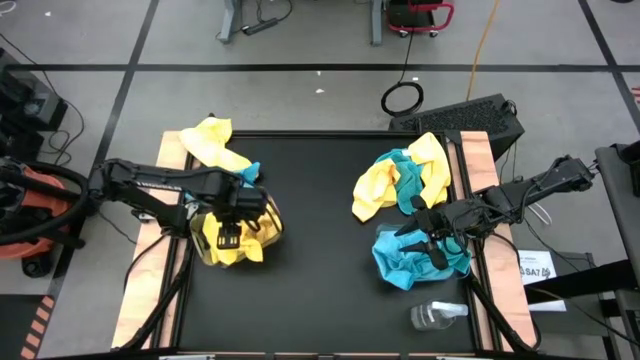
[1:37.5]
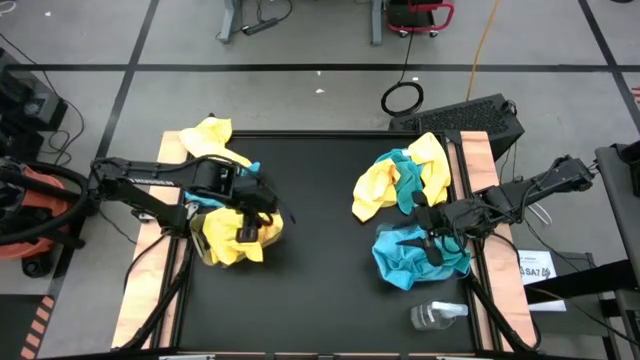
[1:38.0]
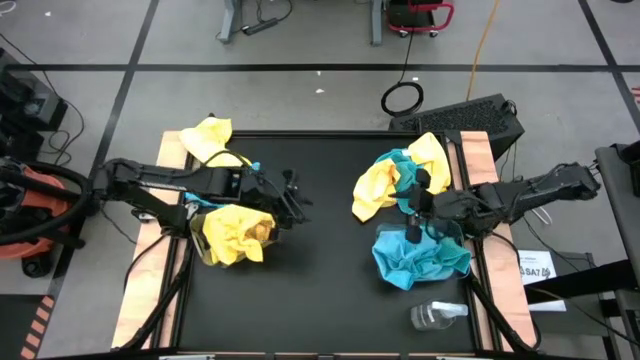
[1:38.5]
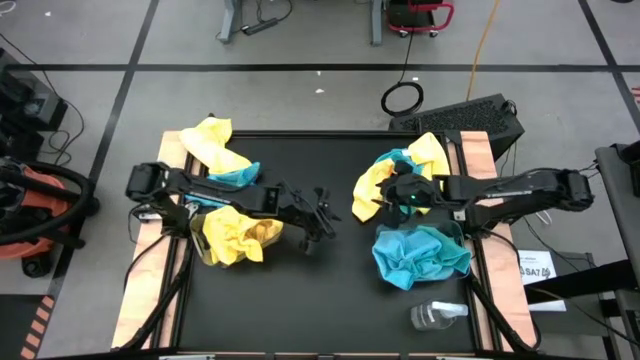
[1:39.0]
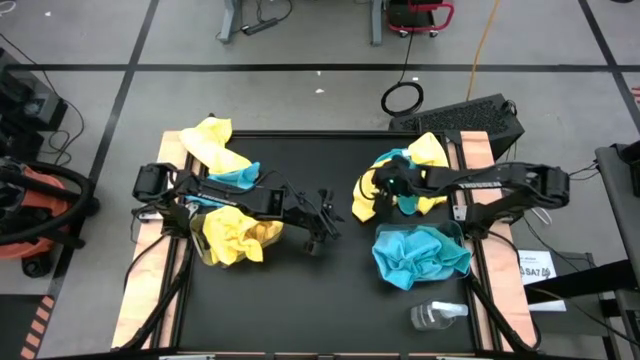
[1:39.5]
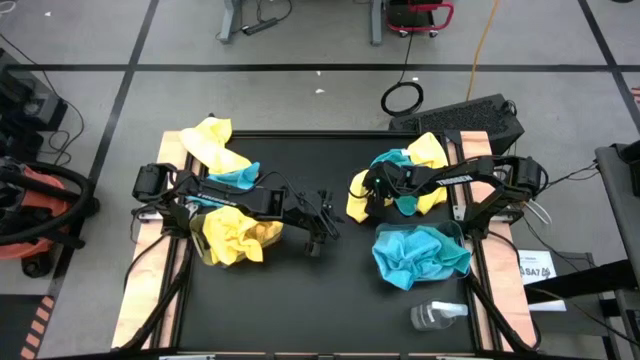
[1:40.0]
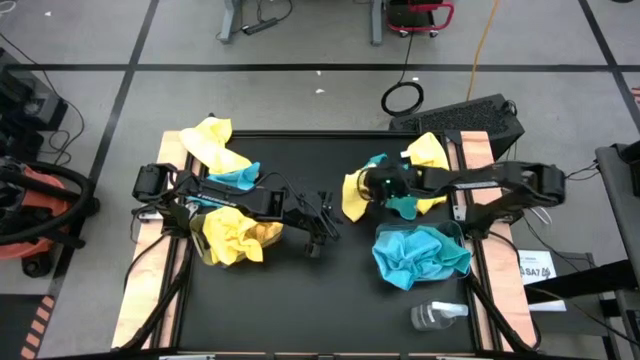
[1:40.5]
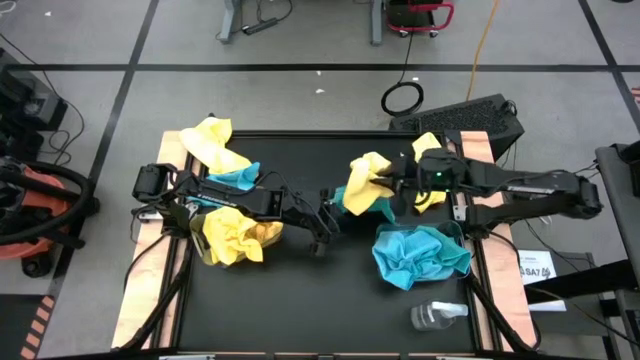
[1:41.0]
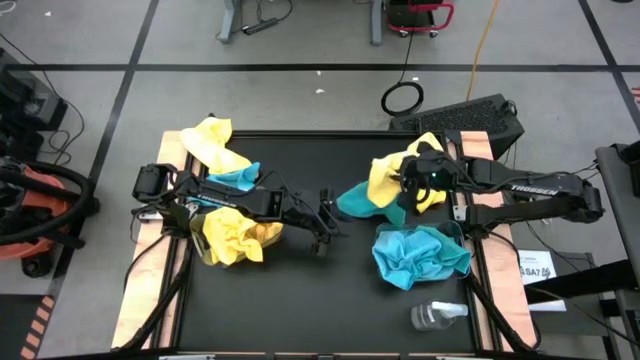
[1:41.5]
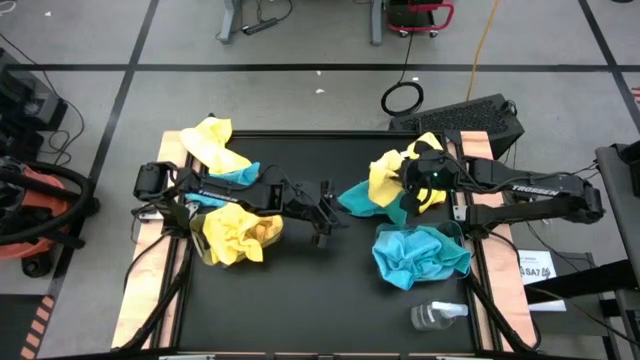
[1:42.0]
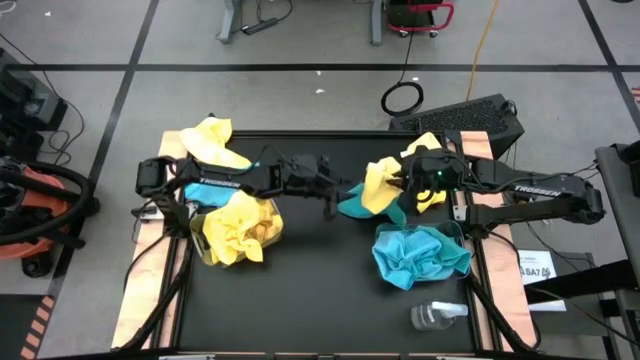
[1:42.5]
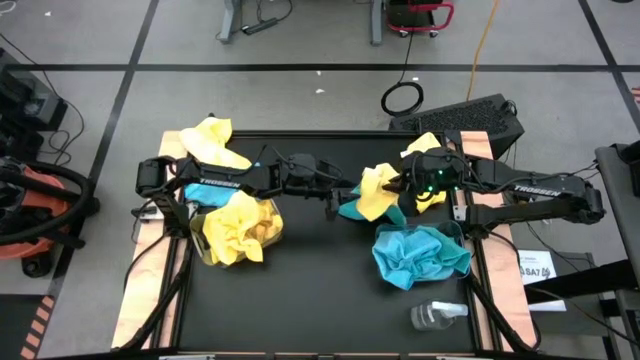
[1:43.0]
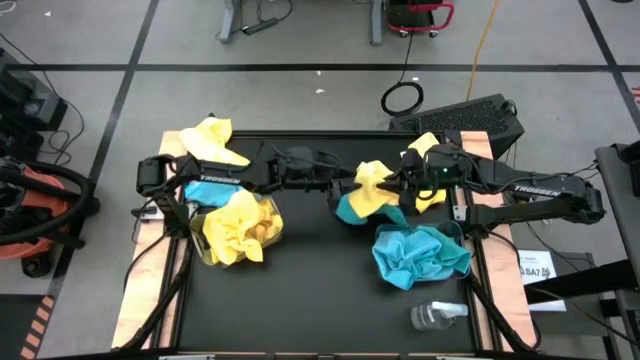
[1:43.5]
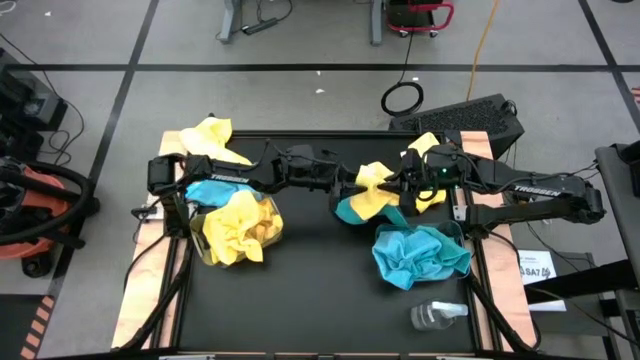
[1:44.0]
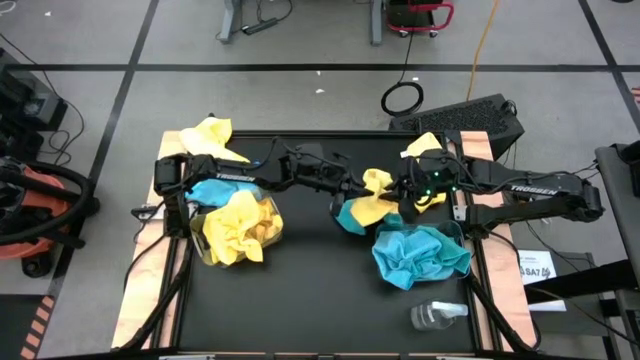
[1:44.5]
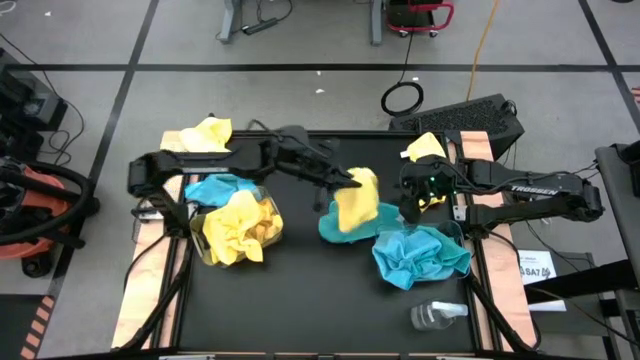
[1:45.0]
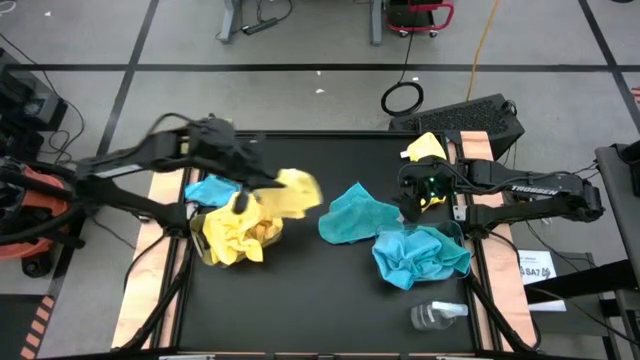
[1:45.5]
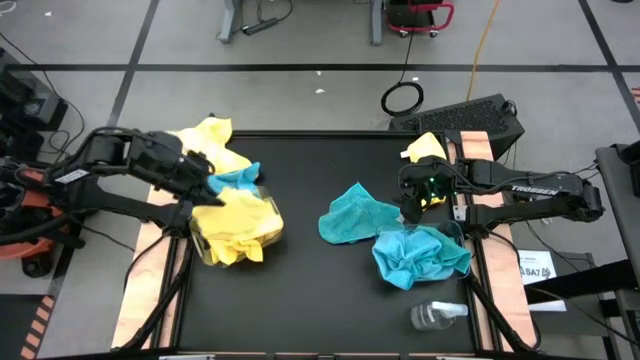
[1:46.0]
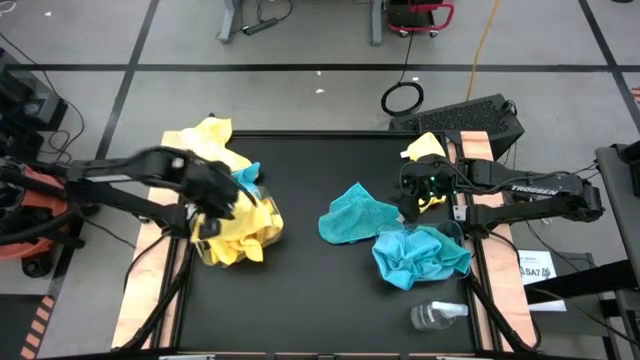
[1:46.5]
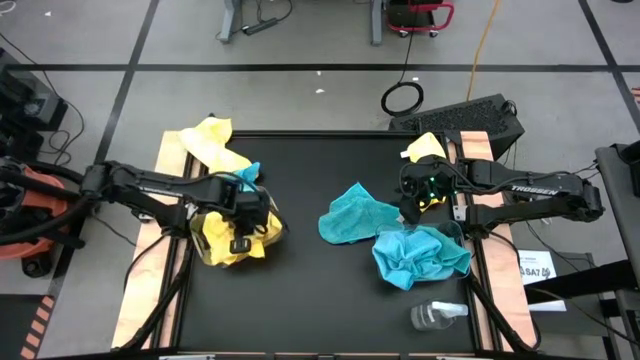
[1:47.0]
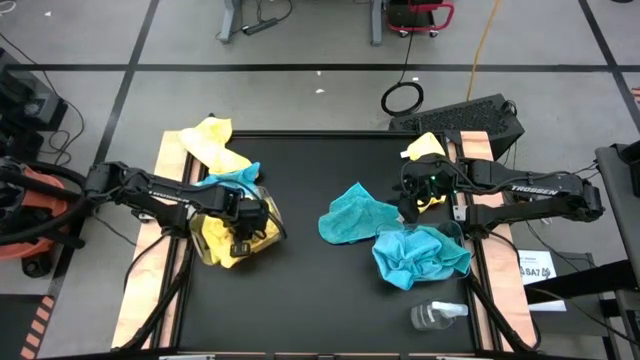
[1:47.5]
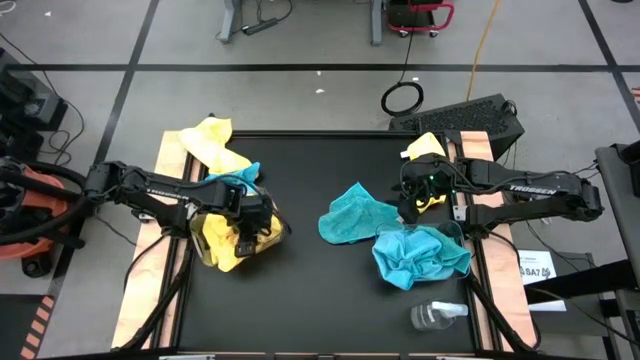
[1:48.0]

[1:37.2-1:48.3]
Task: Sort microfiber towel by color & place in baskets
Put the yellow microfiber towel into the left transparent bin

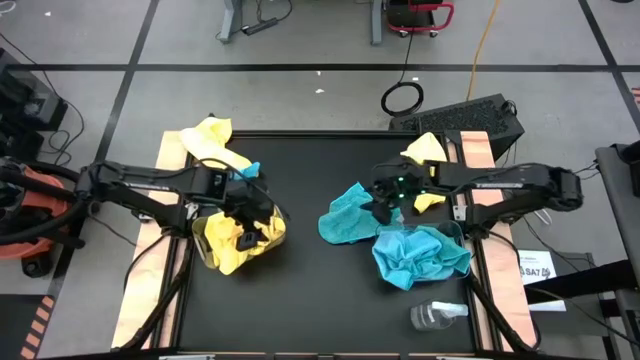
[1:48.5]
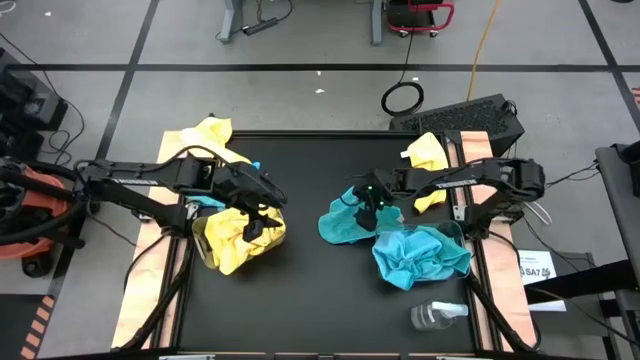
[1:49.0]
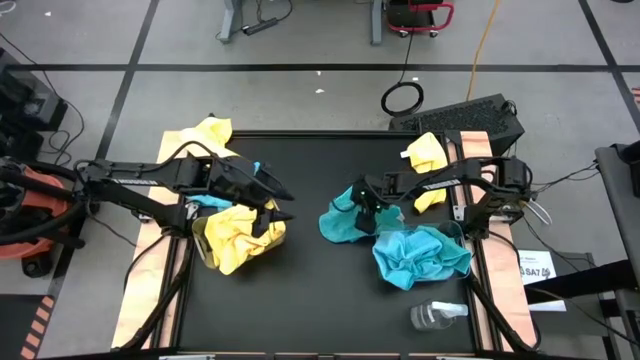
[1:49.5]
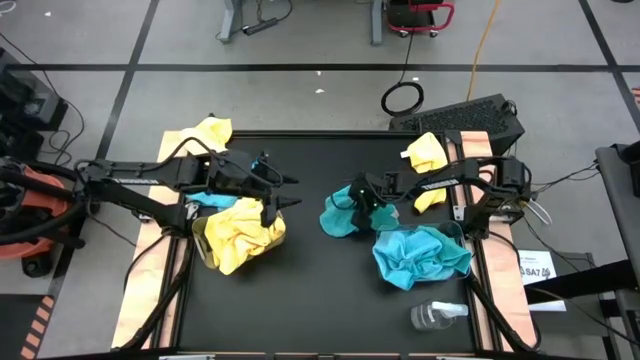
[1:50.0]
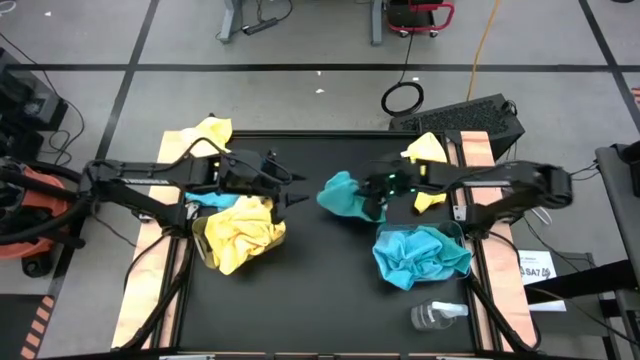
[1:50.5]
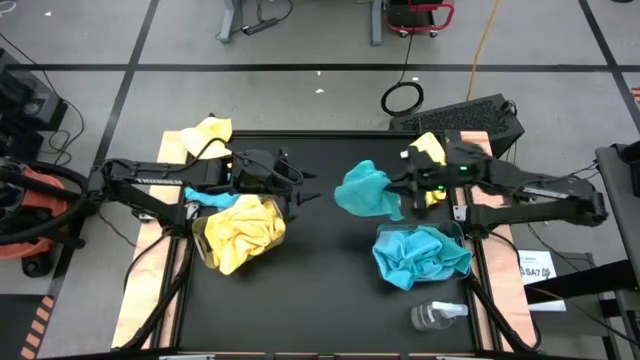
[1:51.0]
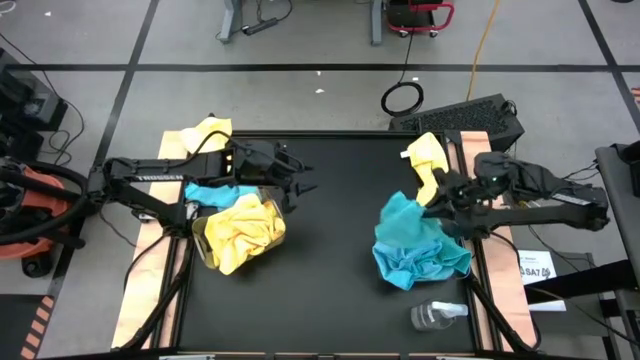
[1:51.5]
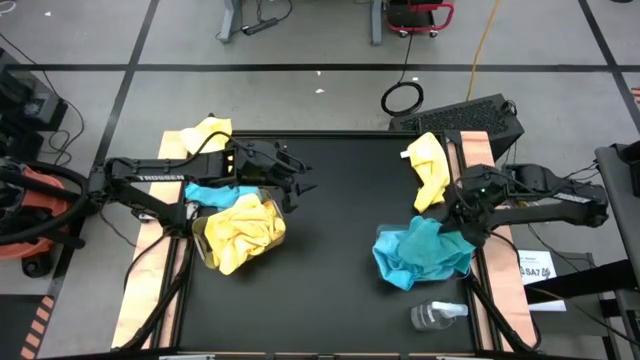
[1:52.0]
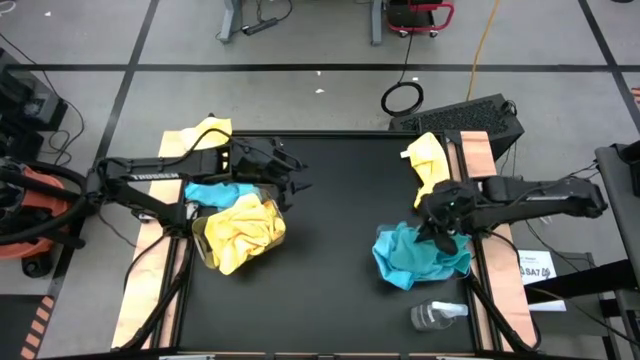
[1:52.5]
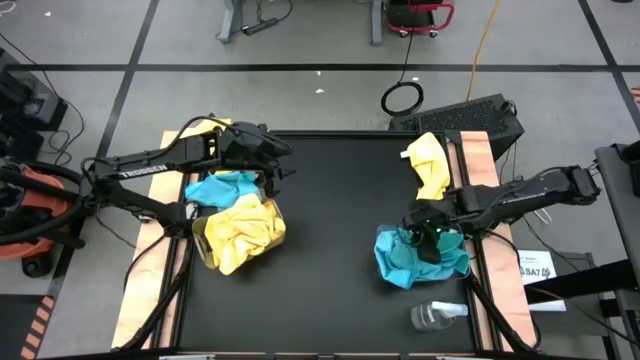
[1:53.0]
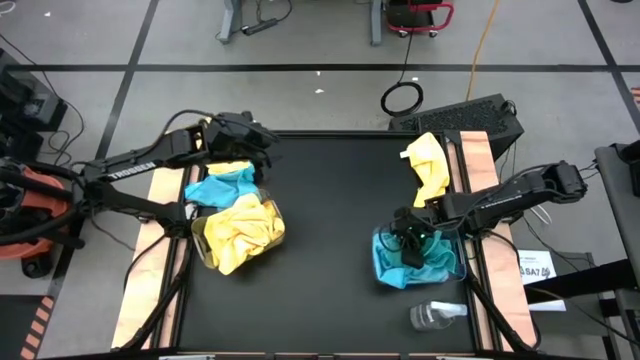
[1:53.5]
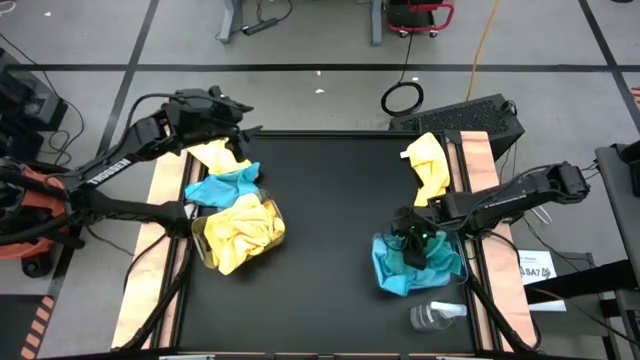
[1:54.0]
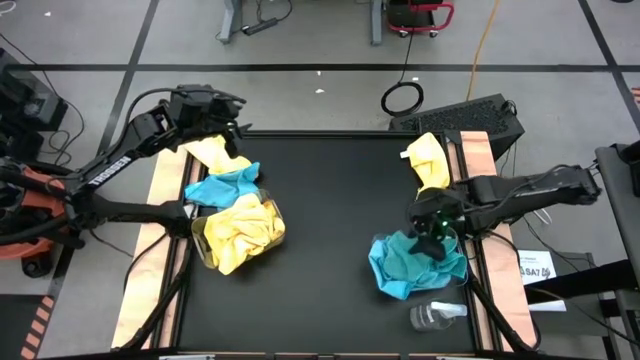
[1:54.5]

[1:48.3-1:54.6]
Put the blue microfiber towel into the right transparent bin

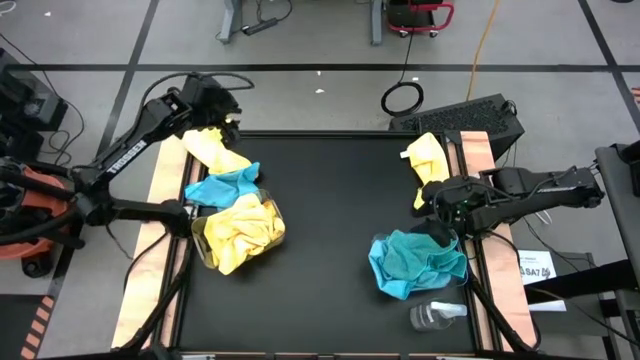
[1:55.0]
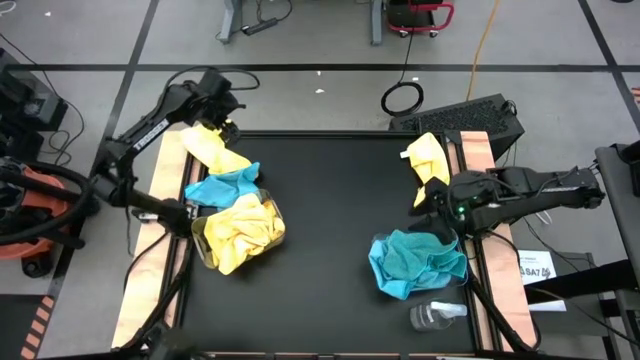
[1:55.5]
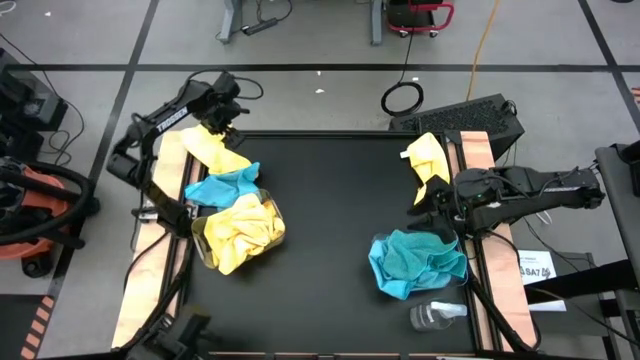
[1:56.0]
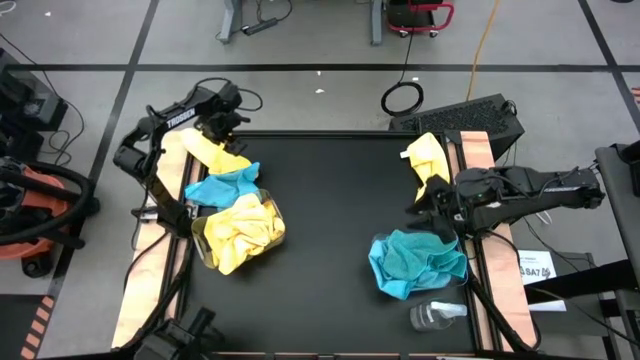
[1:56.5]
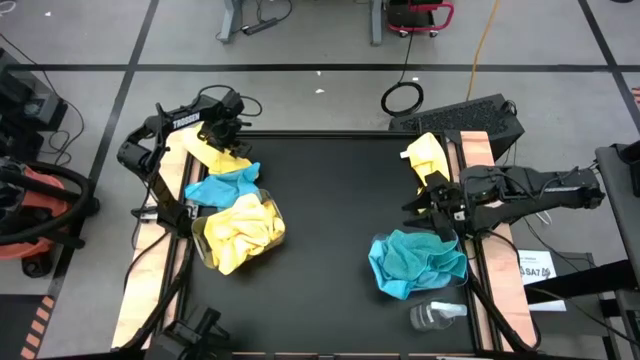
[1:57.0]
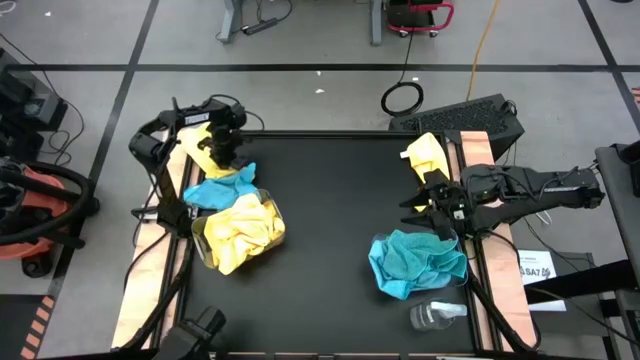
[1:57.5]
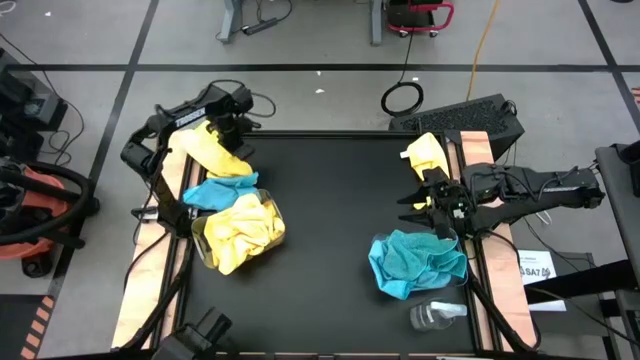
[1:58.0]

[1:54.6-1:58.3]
Put the yellow microfiber towel into the left transparent bin

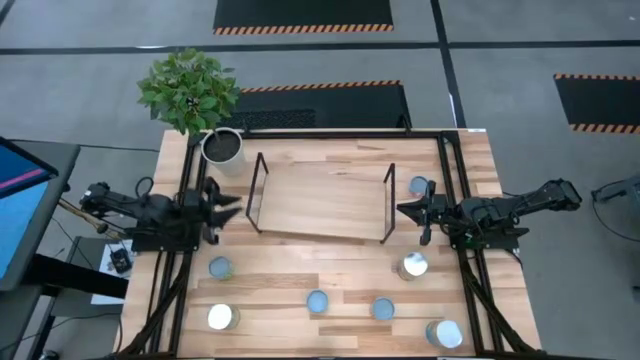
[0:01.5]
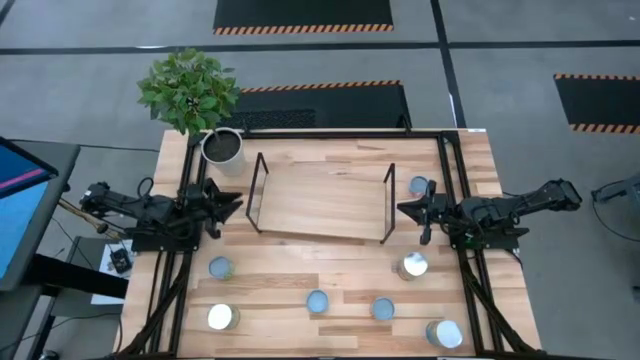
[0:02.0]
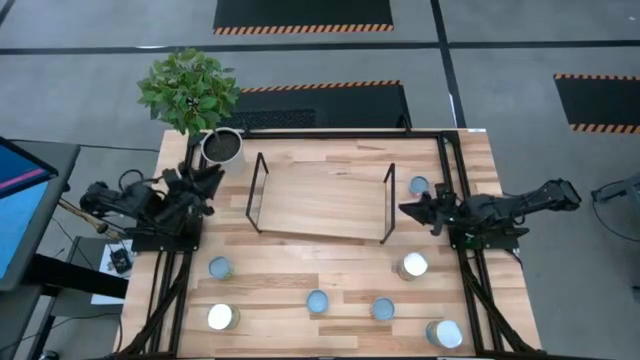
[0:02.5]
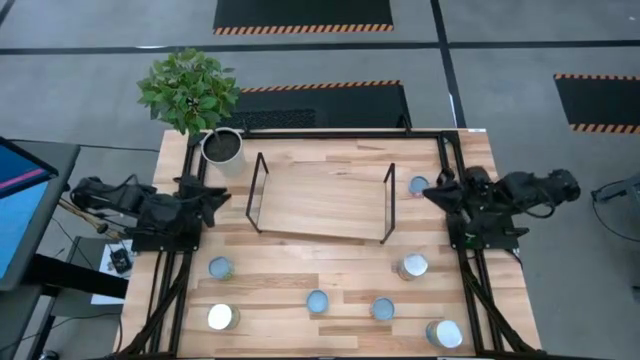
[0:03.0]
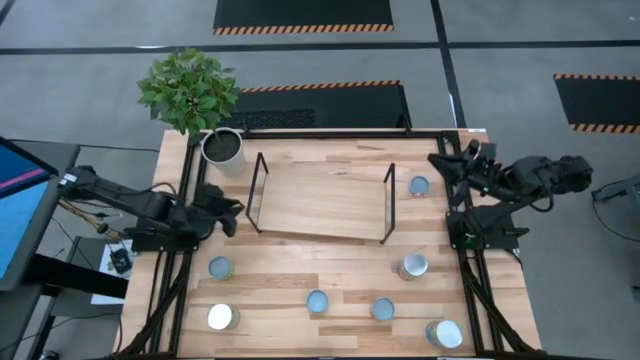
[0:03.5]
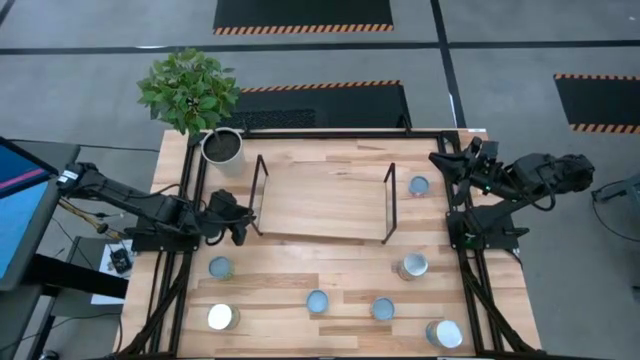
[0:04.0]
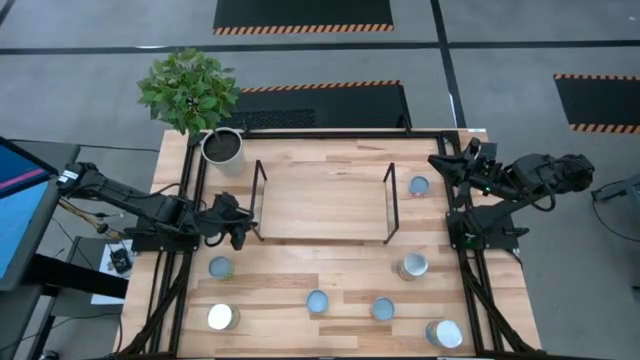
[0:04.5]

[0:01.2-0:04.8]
Task: Pick and place cans onto a shelf
Adjust the shelf
